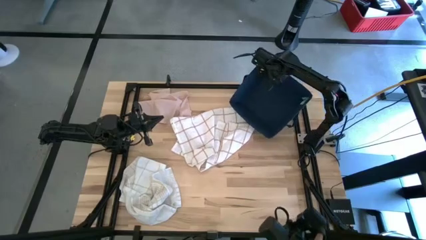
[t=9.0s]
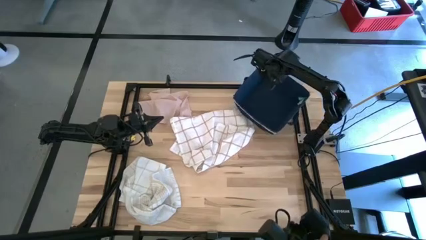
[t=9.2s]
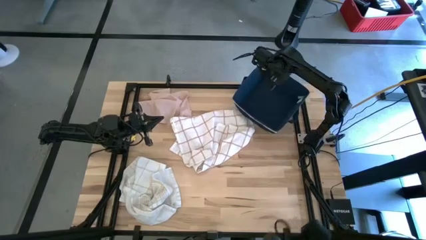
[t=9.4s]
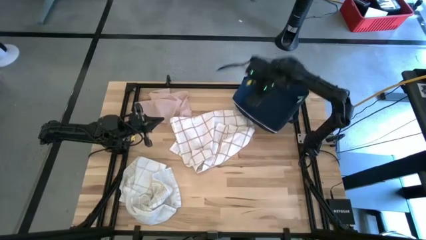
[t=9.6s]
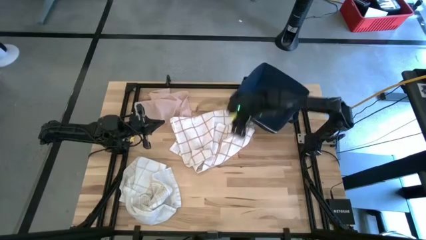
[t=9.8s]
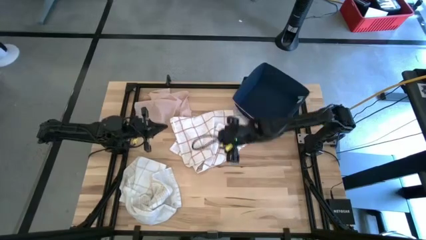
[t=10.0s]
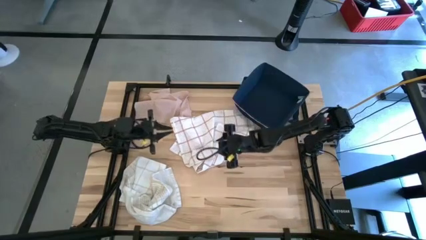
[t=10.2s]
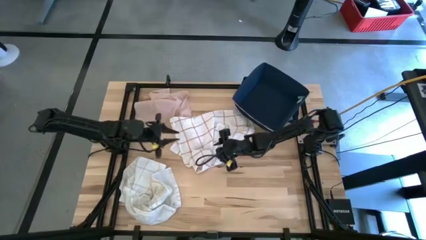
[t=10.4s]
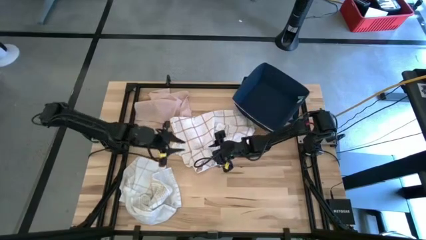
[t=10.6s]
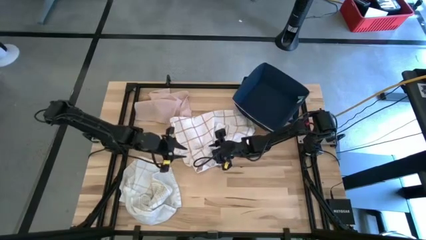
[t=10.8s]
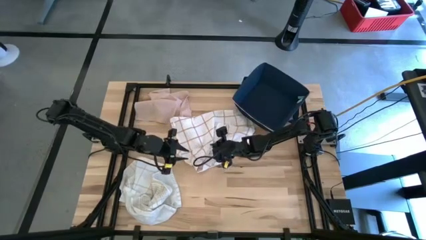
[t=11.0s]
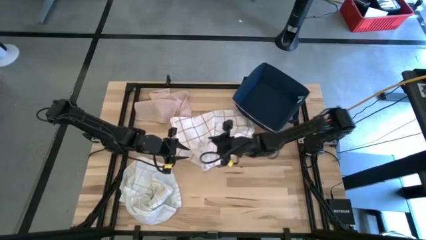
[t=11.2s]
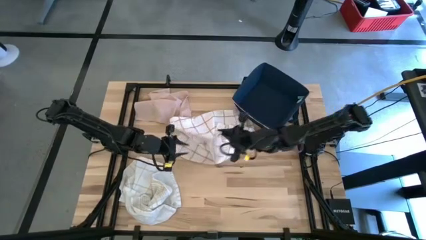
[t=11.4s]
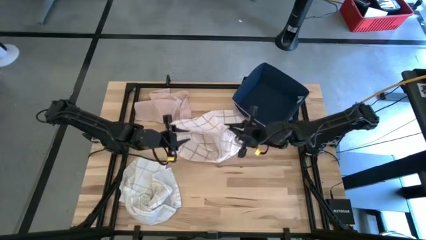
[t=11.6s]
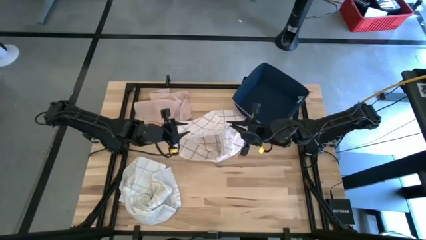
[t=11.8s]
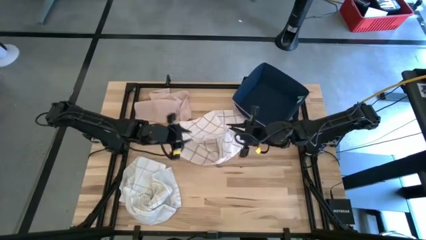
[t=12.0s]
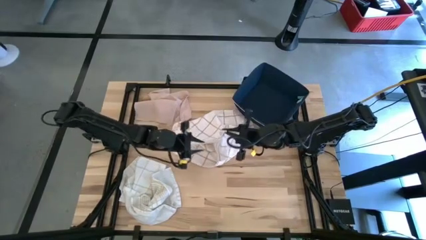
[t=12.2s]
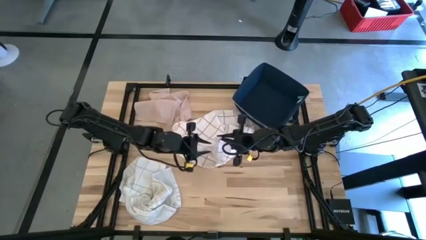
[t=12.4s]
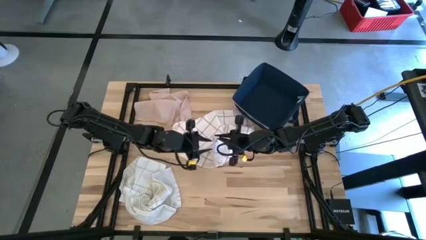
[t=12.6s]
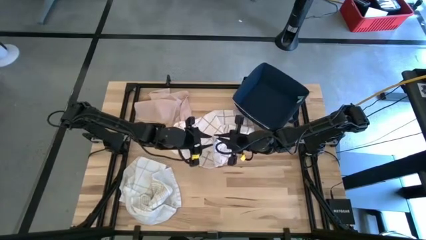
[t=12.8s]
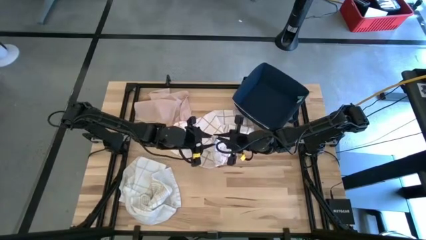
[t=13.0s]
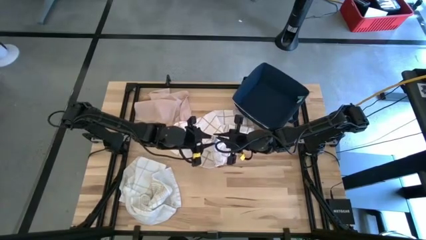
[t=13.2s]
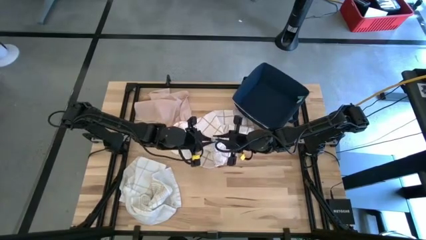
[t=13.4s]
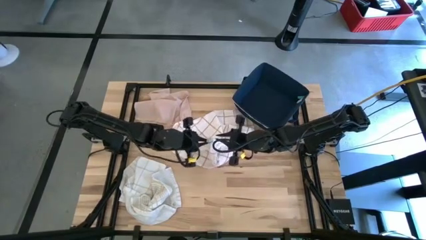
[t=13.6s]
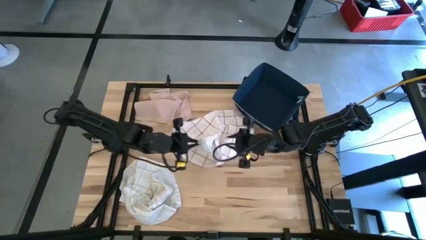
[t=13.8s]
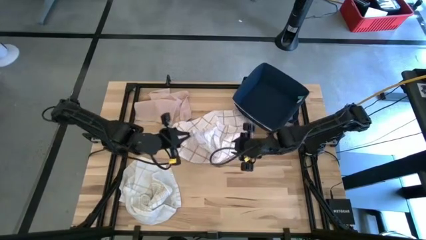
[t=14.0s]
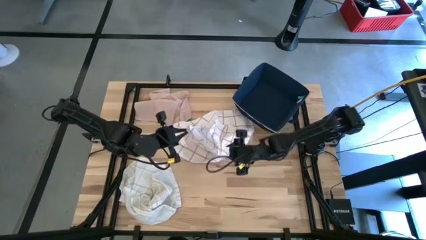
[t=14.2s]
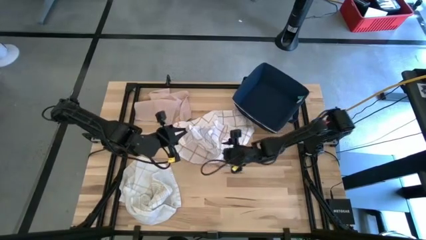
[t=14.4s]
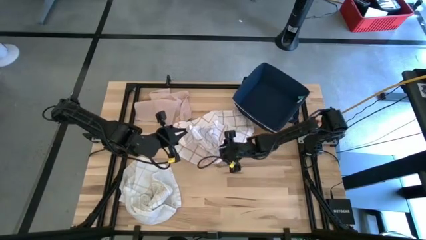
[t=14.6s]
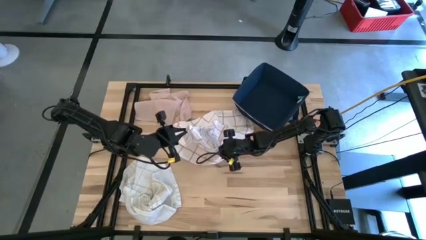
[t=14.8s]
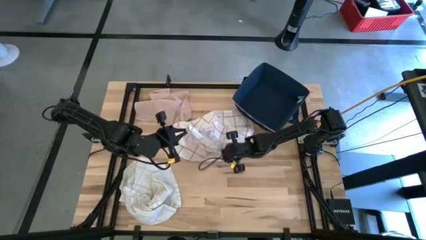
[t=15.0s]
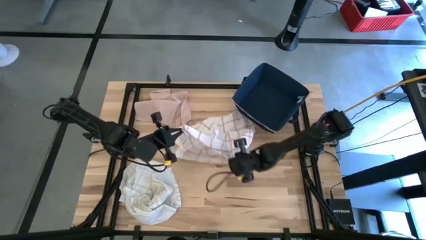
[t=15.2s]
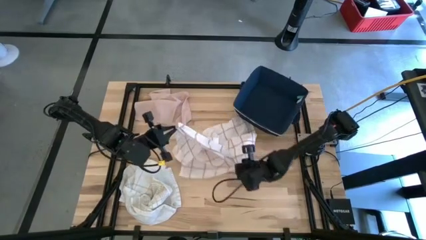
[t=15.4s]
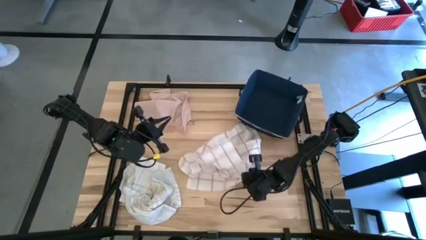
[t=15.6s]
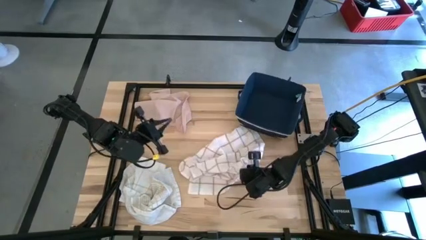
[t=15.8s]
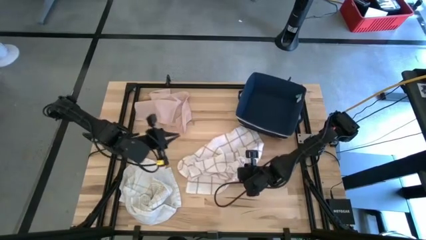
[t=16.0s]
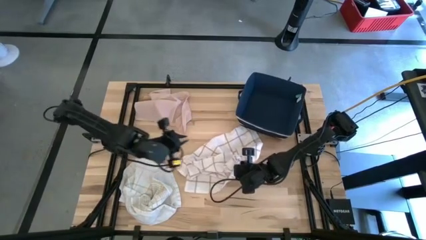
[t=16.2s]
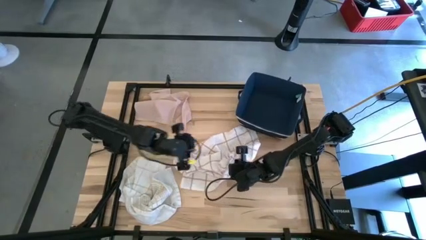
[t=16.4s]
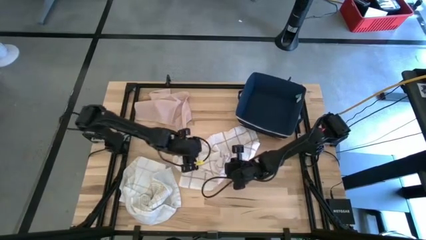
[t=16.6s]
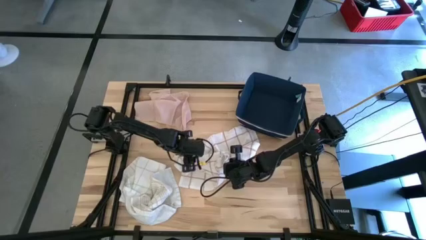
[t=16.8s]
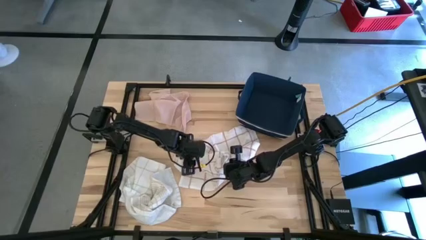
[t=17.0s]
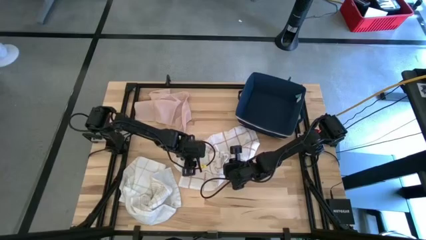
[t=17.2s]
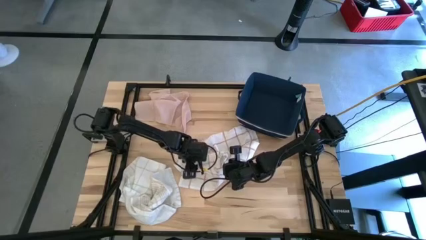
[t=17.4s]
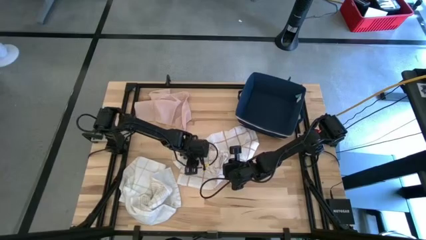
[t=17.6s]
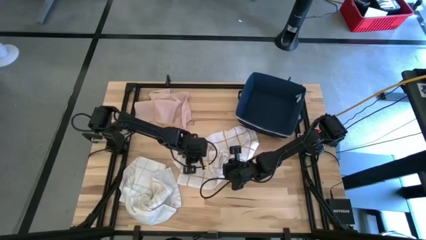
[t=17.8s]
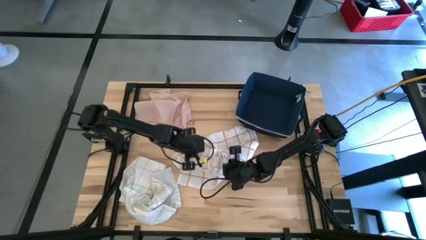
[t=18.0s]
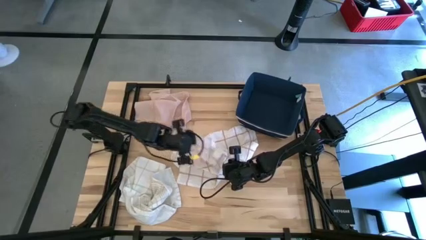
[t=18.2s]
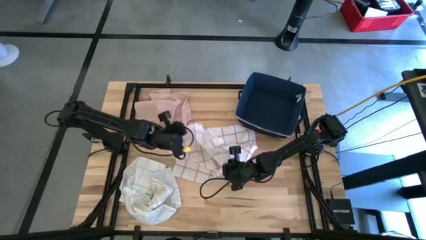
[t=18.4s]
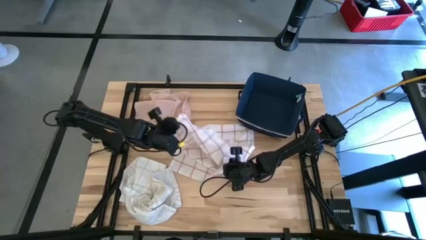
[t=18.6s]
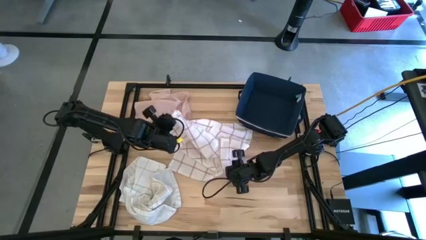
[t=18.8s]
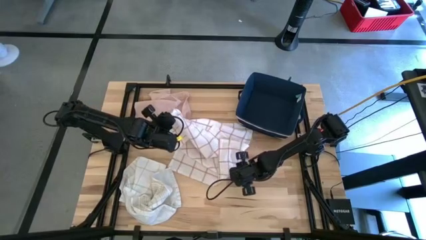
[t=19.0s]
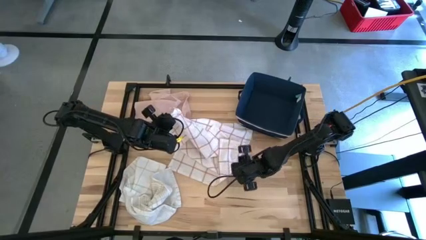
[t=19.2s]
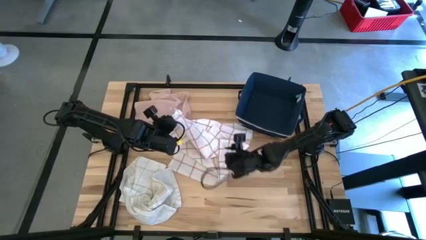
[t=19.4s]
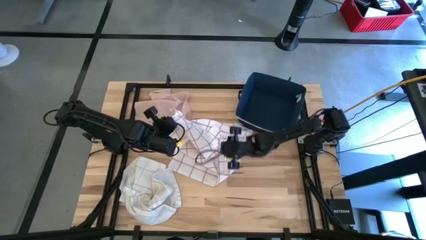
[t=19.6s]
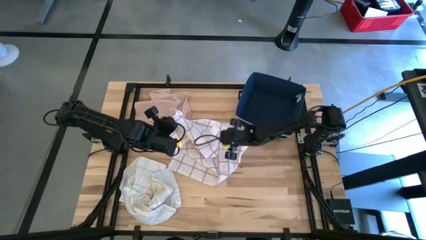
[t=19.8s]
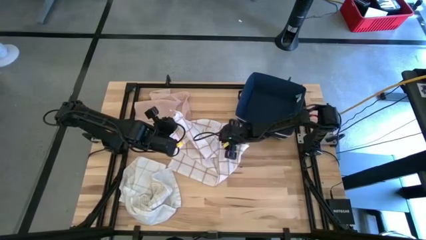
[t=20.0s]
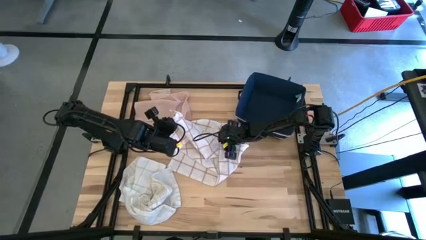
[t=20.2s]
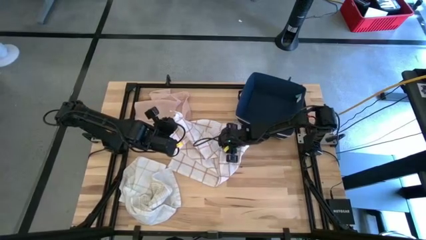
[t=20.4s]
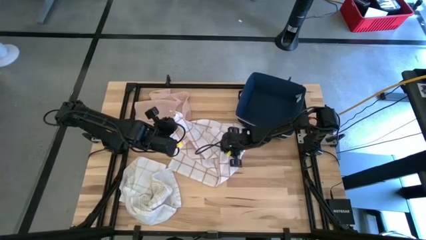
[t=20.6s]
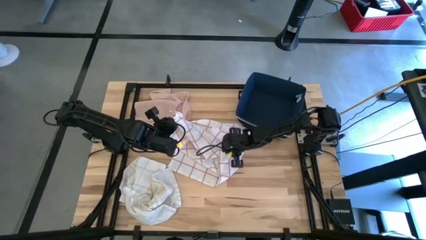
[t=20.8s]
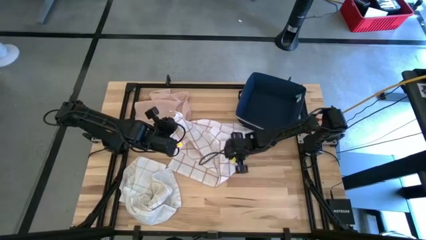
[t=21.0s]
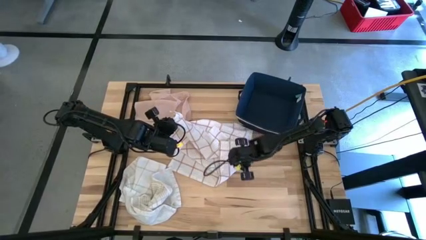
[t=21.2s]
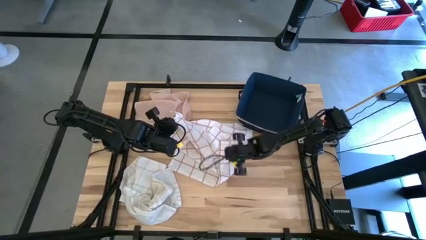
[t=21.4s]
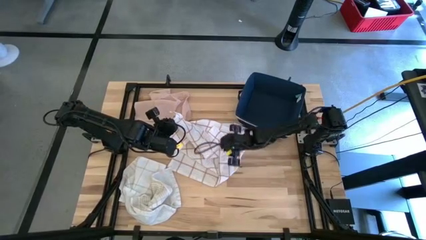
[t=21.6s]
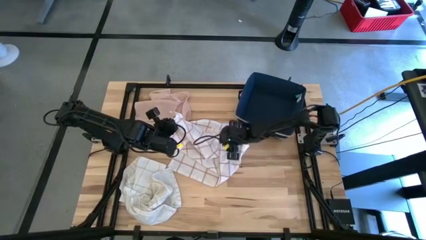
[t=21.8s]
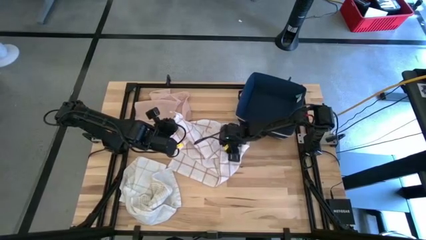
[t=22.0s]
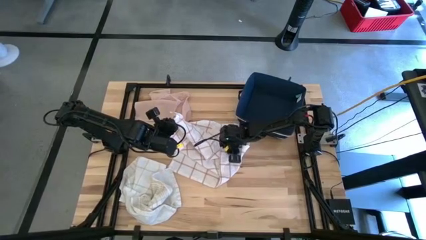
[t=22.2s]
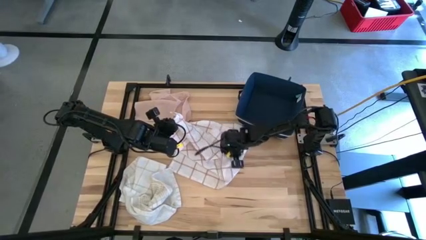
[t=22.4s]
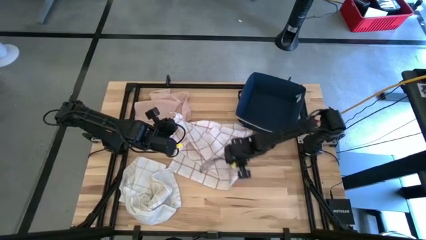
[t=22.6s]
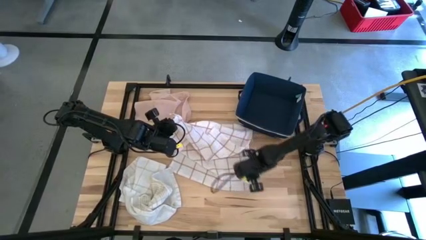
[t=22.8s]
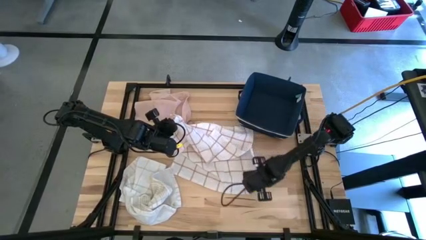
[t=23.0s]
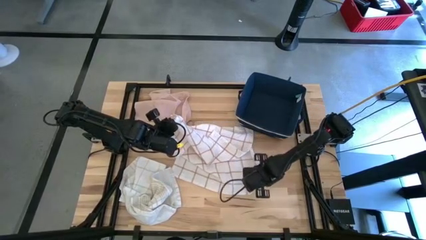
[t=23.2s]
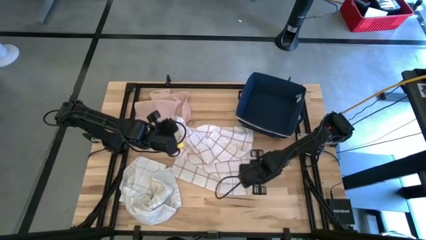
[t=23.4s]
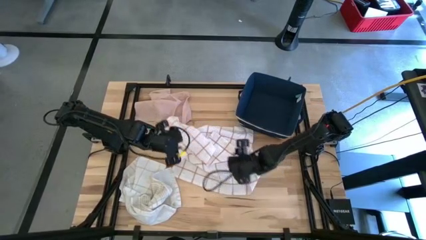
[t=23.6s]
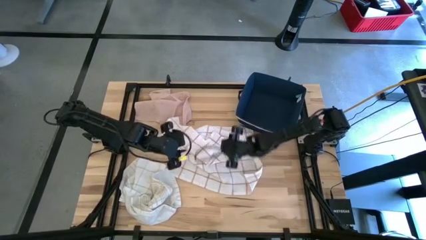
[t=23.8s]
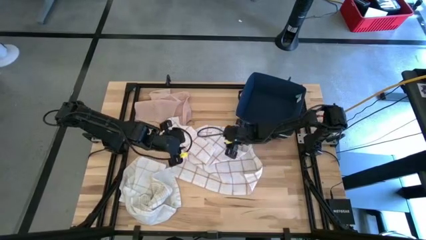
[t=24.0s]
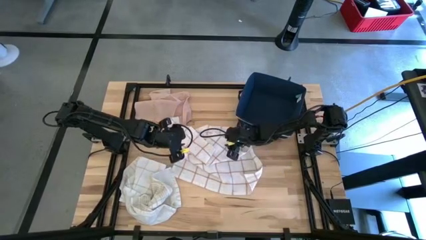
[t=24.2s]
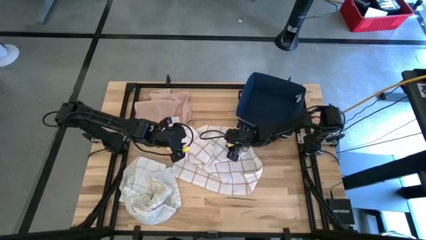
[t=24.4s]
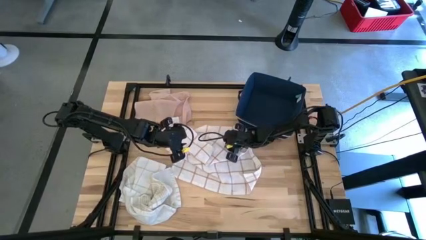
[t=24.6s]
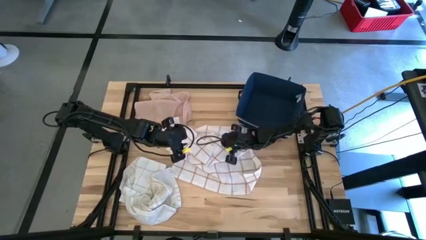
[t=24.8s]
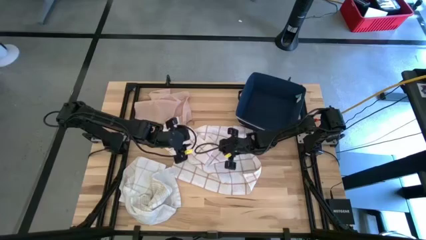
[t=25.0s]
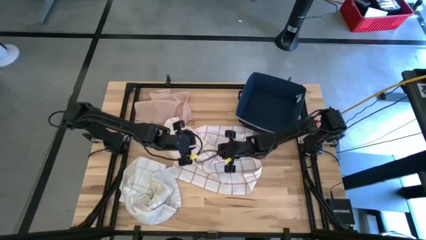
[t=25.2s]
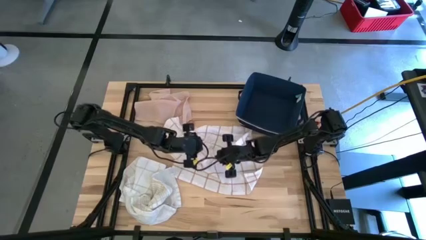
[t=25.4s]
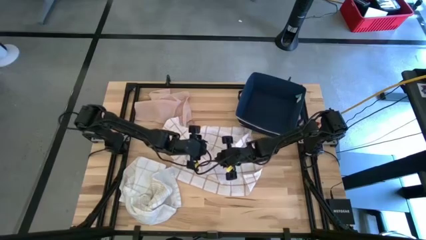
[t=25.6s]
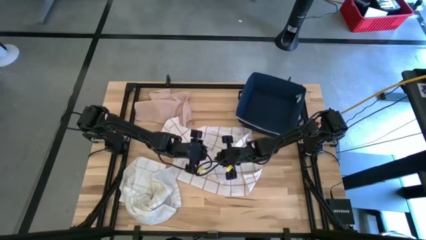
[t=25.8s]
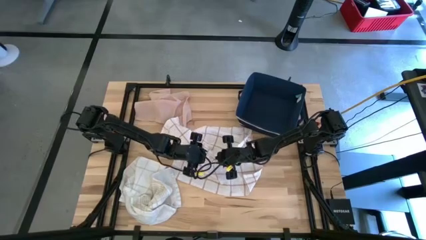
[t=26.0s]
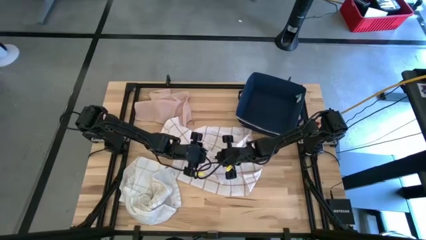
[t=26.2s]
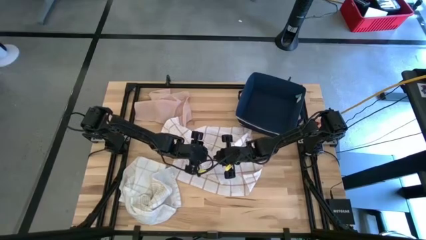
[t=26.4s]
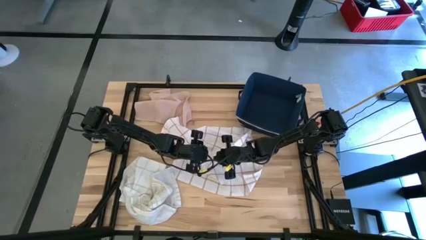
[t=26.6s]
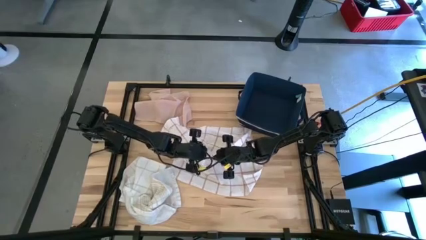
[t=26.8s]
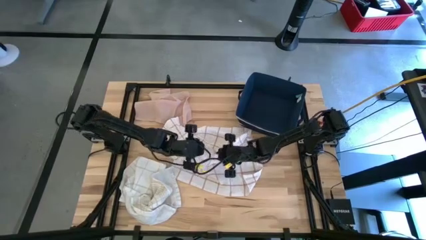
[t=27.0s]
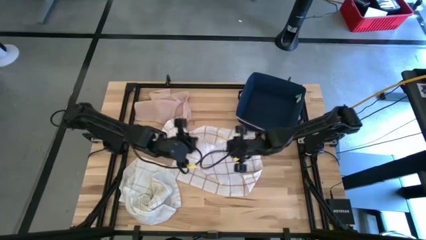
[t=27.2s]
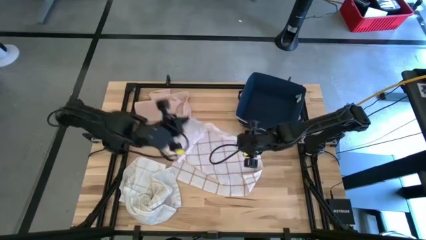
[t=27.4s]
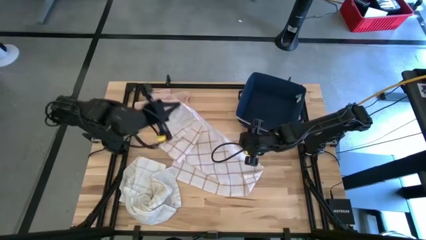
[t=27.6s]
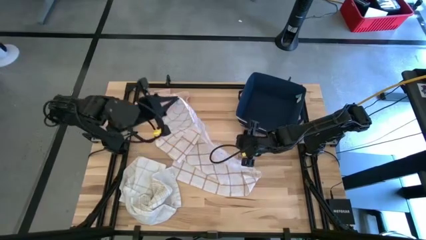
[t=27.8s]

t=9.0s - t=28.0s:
Task: Fold towel
Fold the white with red-stripe towel
